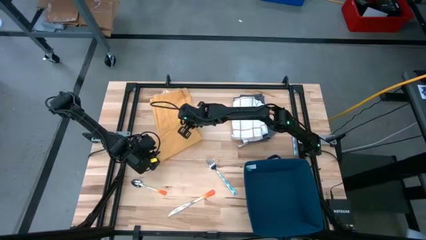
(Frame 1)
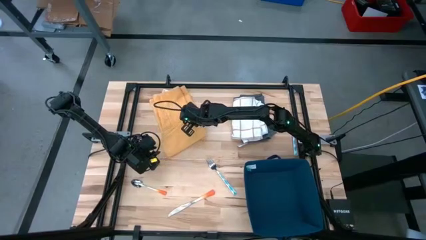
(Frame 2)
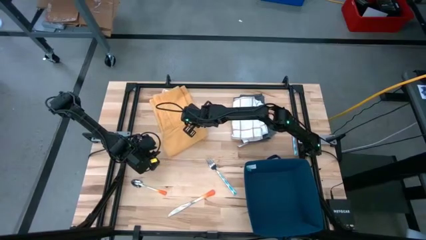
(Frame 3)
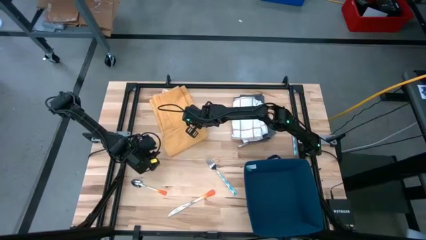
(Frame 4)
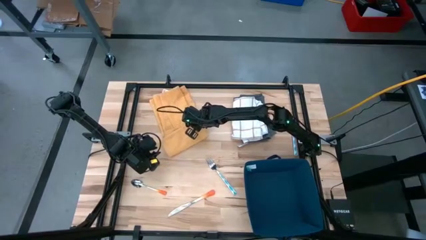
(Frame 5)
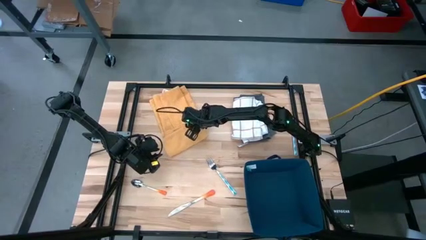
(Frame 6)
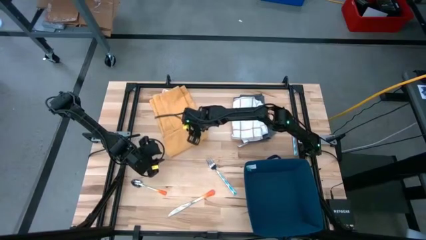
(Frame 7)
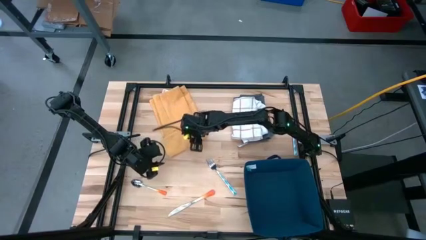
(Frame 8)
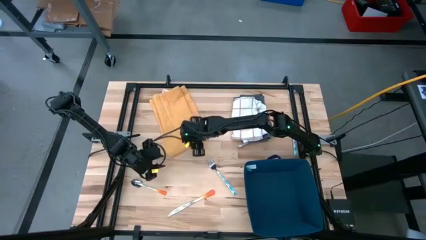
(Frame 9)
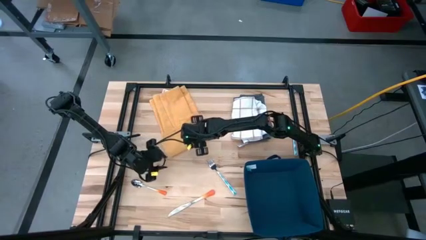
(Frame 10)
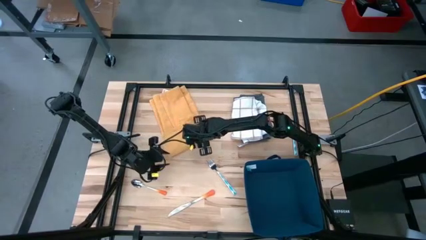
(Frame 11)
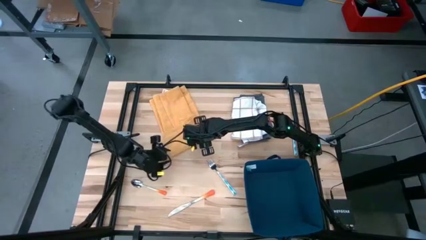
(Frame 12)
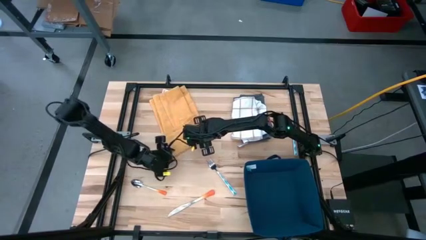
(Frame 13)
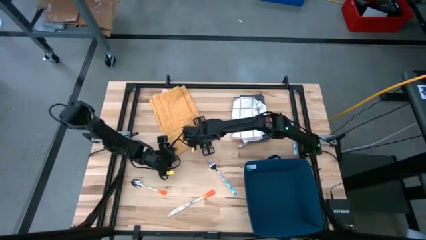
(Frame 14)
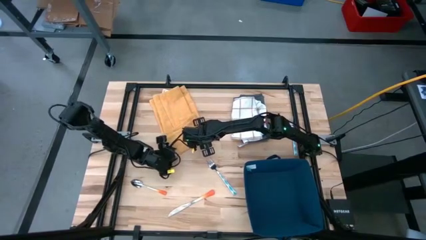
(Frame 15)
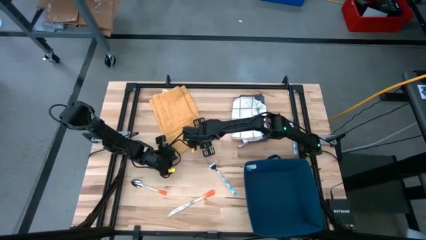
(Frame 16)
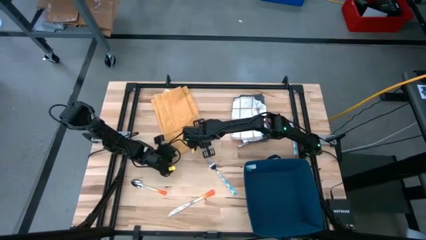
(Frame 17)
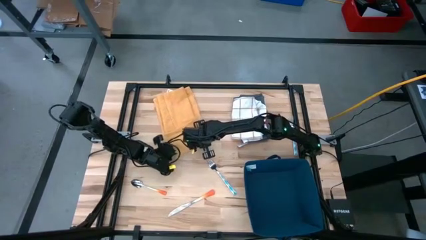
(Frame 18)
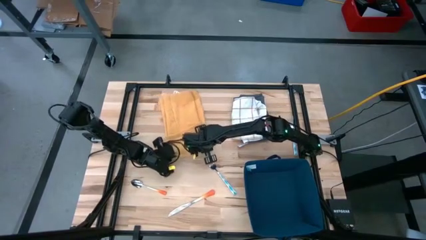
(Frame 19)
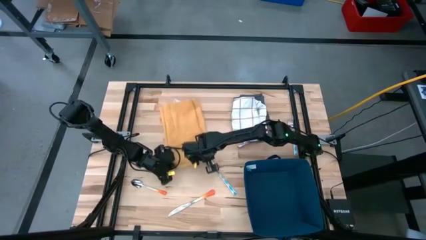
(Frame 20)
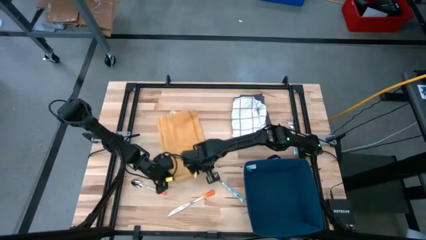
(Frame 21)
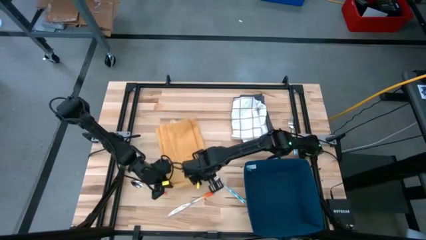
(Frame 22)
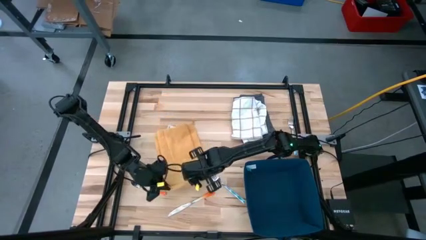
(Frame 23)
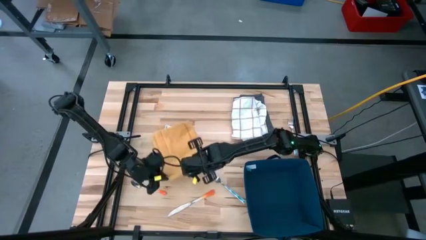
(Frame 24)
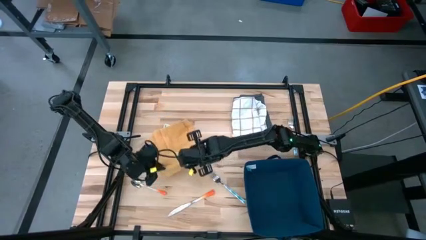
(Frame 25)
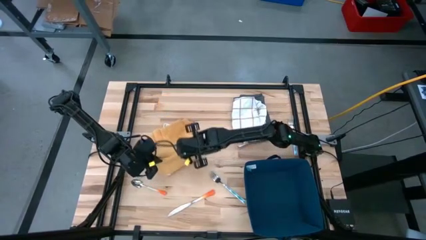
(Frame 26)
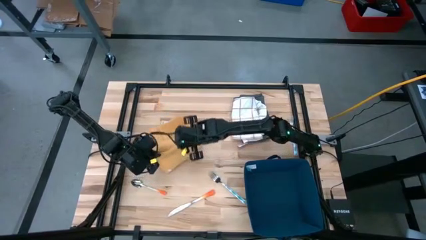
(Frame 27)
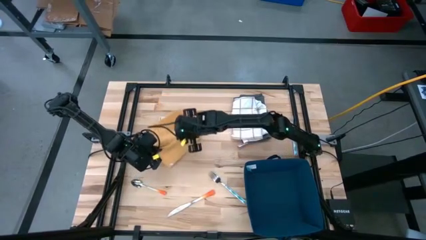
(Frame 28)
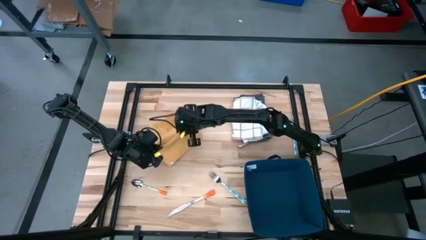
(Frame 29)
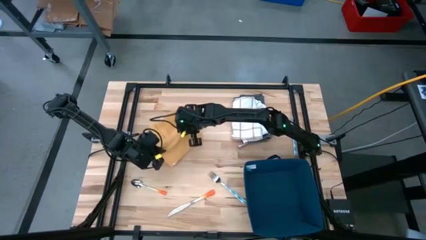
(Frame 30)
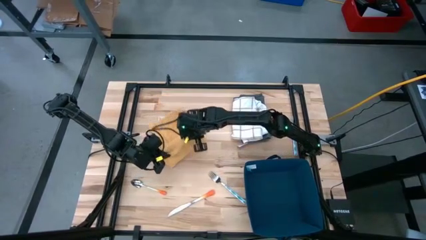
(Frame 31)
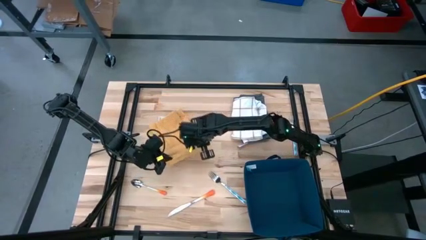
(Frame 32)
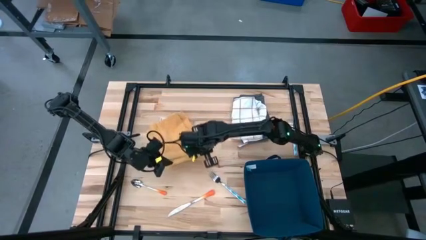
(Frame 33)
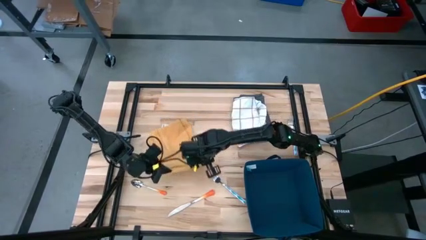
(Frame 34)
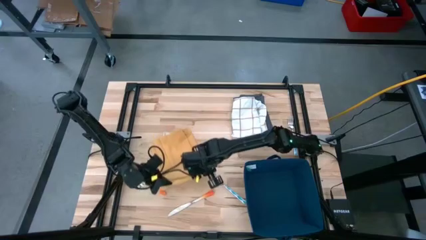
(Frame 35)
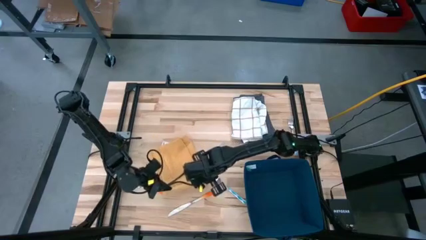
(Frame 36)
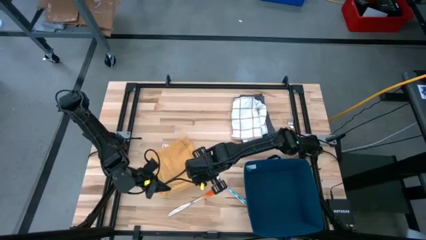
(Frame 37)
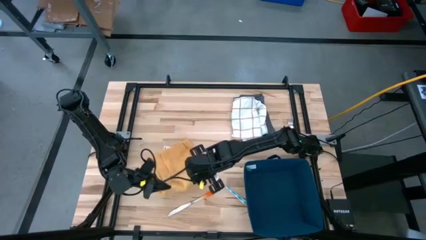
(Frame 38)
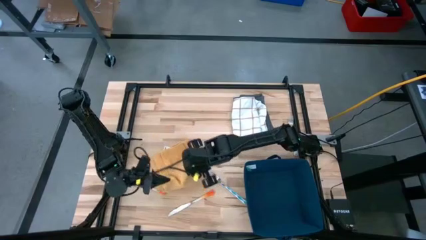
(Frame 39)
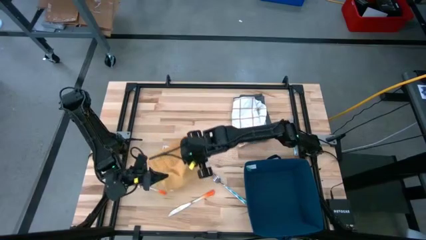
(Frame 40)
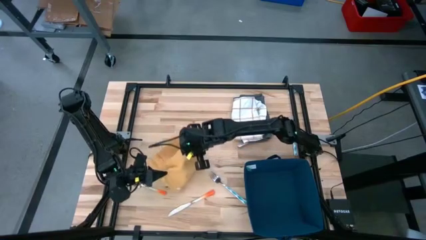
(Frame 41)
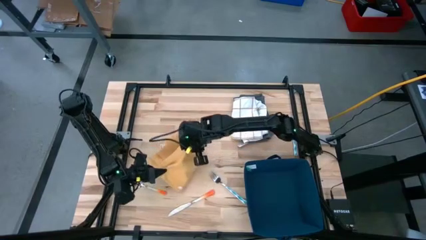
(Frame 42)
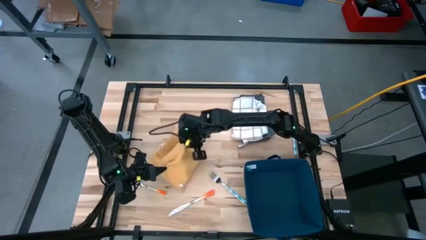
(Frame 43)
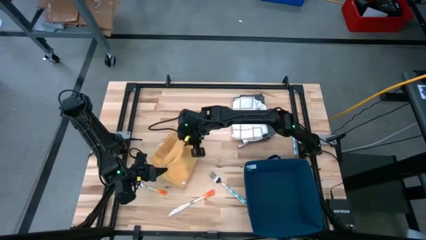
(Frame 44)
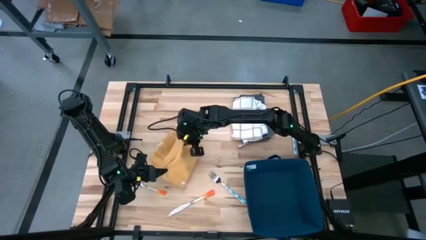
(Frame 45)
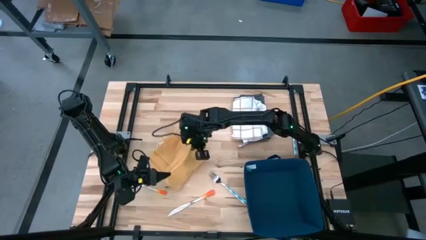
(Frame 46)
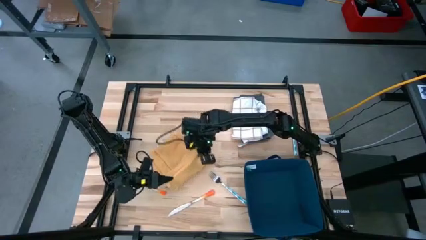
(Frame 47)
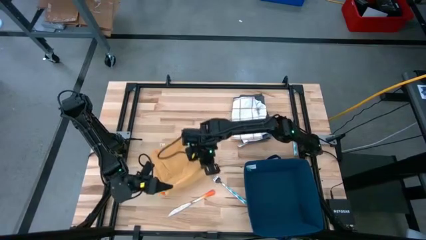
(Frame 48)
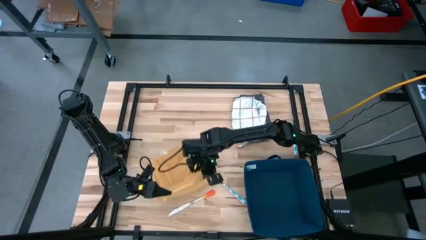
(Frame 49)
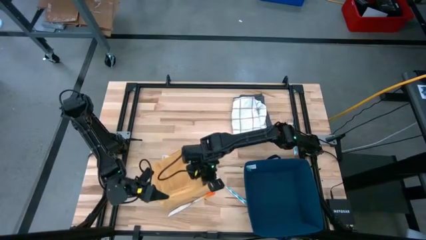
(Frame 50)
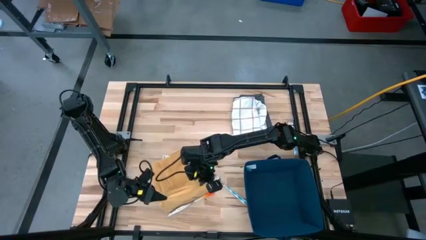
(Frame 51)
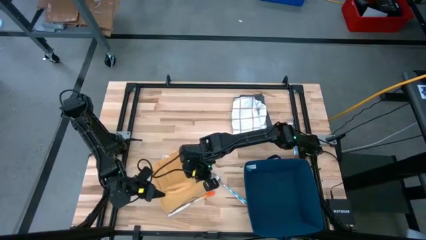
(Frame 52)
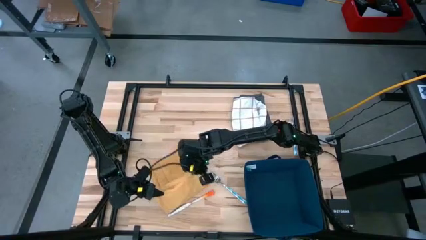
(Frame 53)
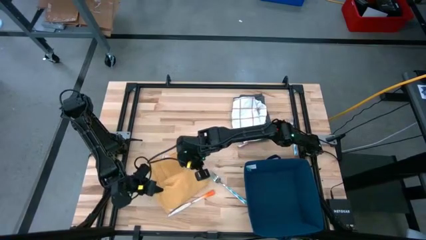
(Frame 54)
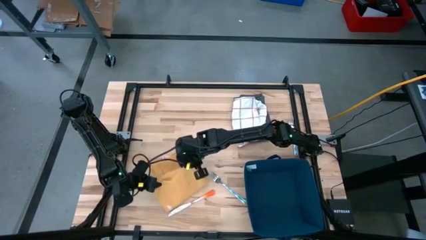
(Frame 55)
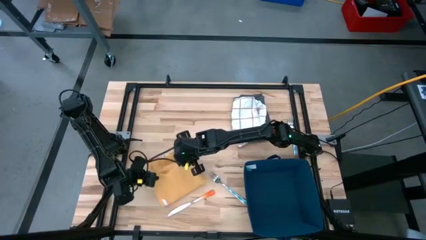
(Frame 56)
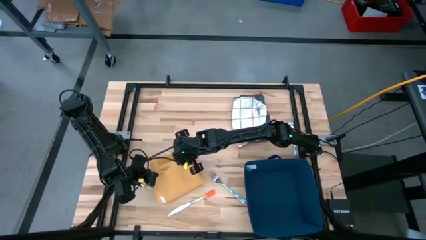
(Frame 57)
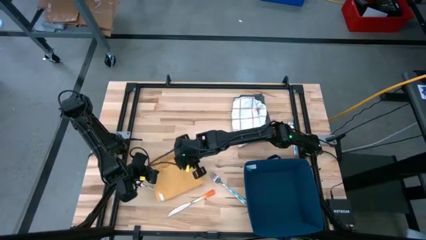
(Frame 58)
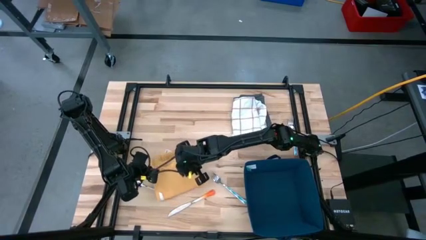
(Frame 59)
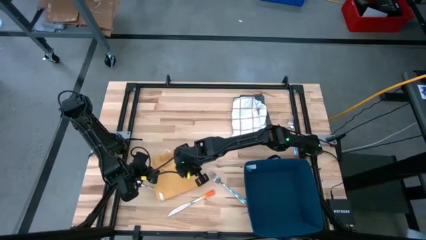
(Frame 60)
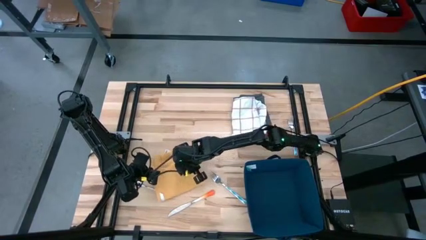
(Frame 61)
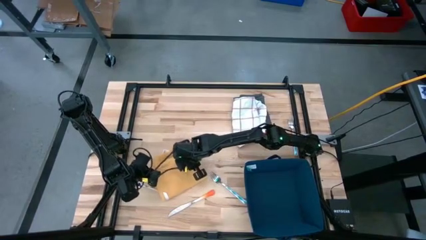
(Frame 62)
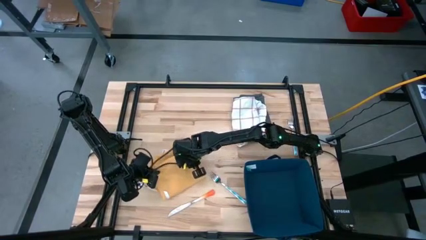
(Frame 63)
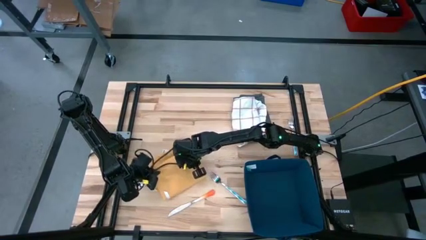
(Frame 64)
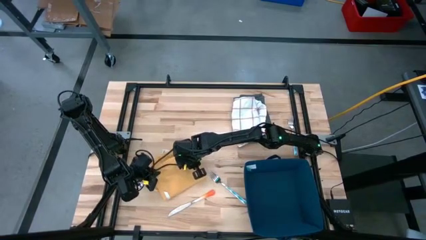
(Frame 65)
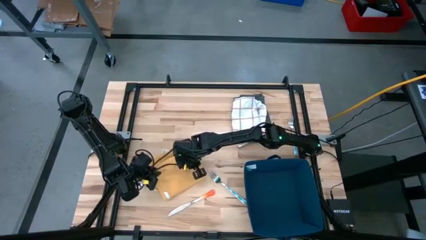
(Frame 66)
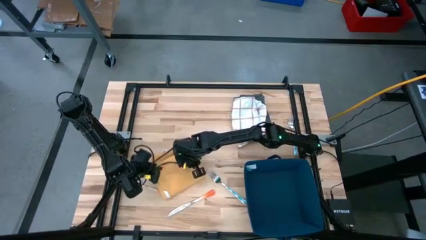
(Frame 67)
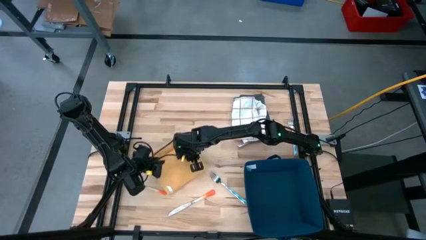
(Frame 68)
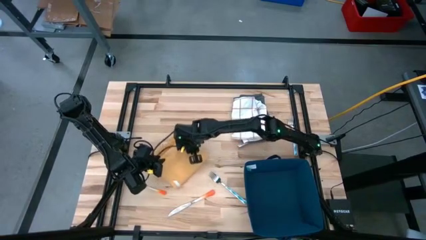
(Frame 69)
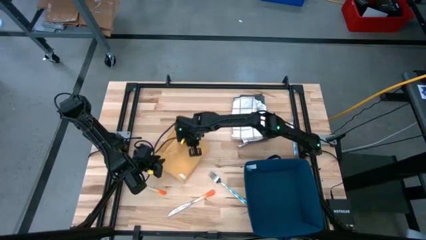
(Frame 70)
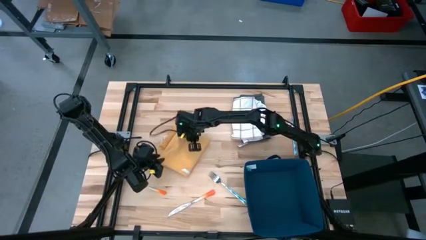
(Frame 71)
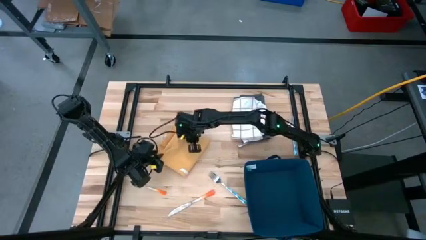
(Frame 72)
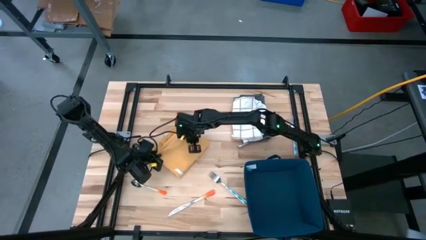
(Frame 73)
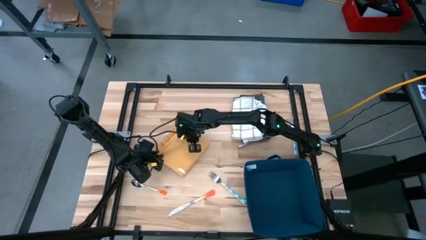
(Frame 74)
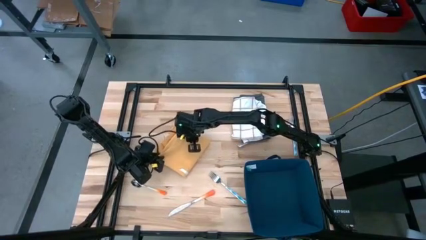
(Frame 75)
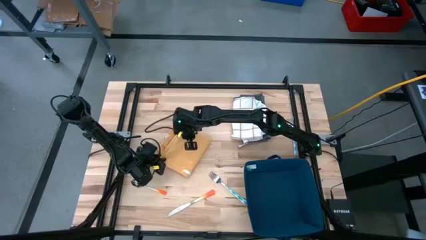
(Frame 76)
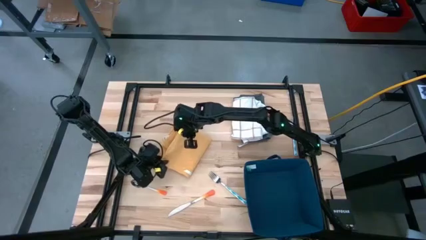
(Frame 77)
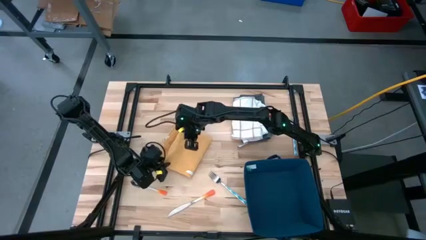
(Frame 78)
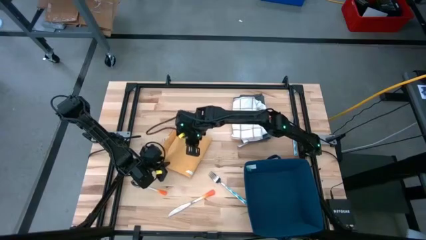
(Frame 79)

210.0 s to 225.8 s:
Task: Fold towel
Fold the orange towel
